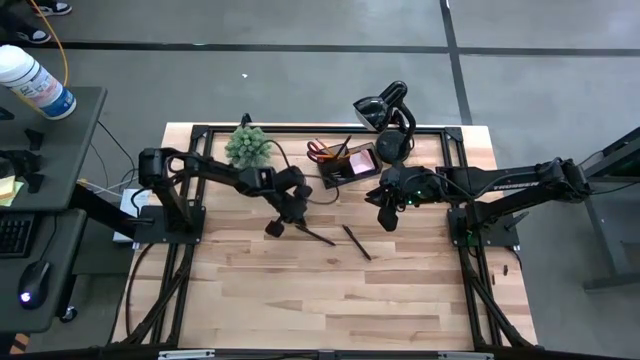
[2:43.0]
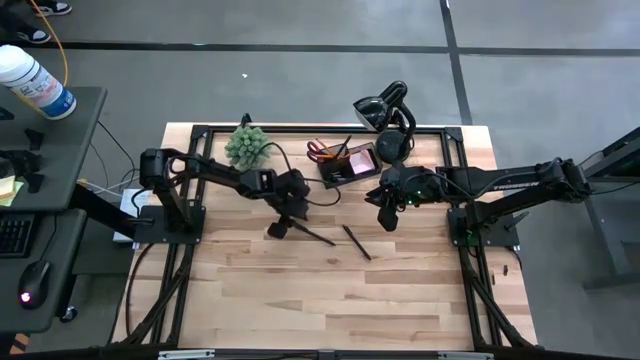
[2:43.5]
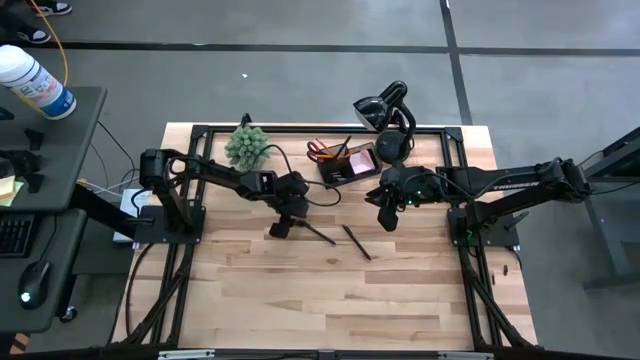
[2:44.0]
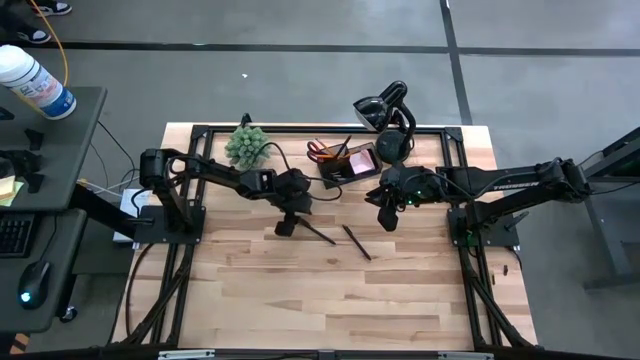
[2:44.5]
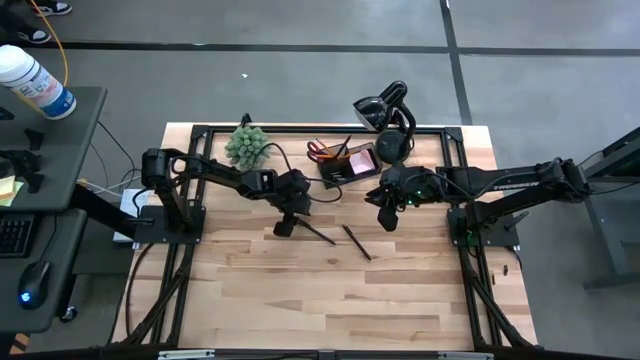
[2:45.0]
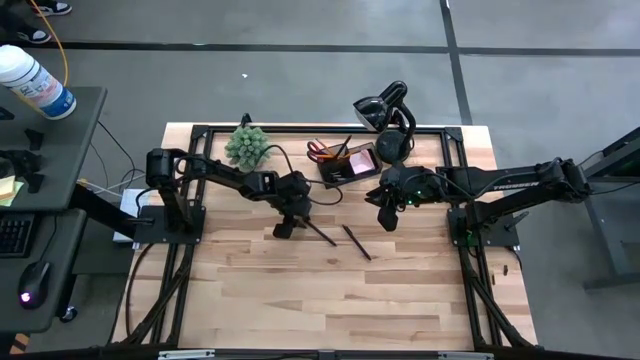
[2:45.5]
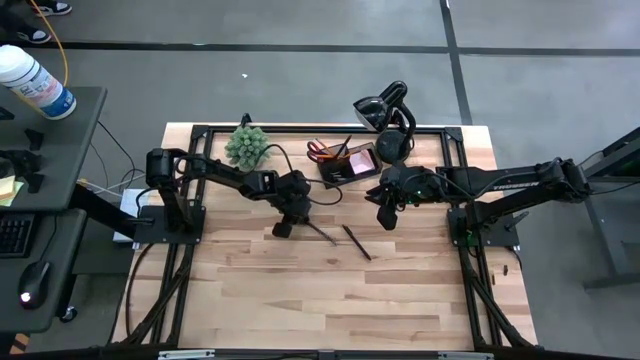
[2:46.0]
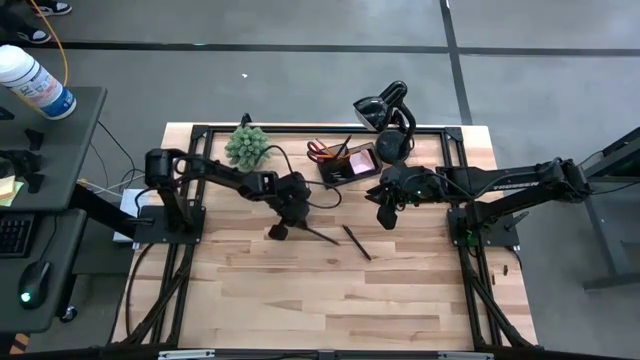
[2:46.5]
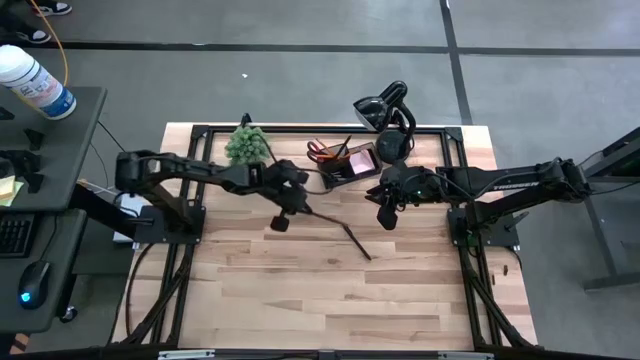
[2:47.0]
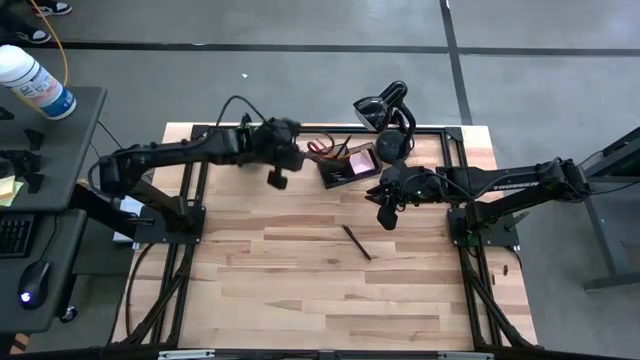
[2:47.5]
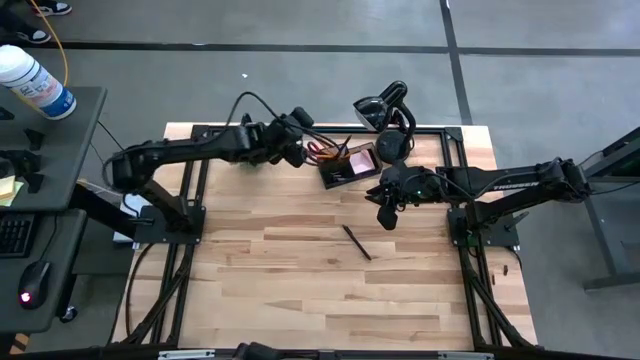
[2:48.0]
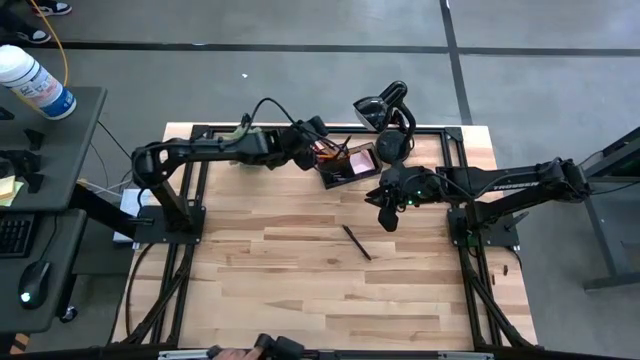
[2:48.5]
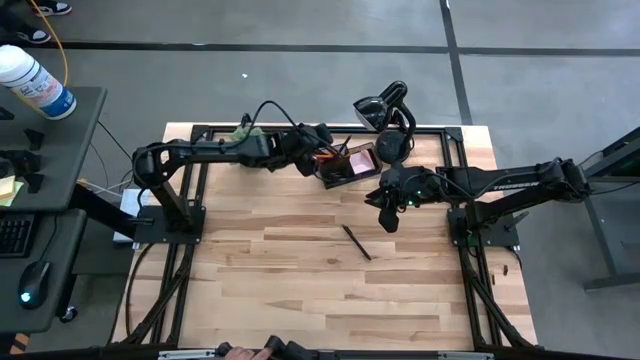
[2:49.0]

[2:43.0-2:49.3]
Task: Pick and place office supplies into organizer
Put the left black pen into the black desk organizer

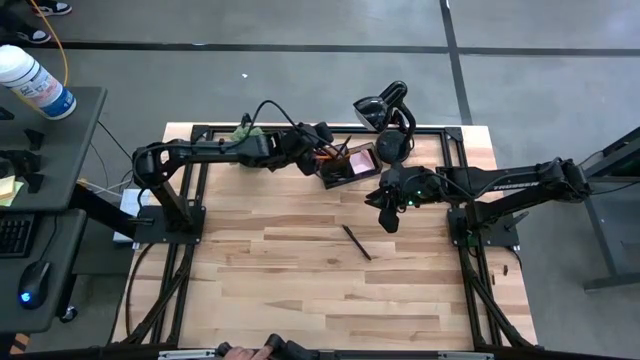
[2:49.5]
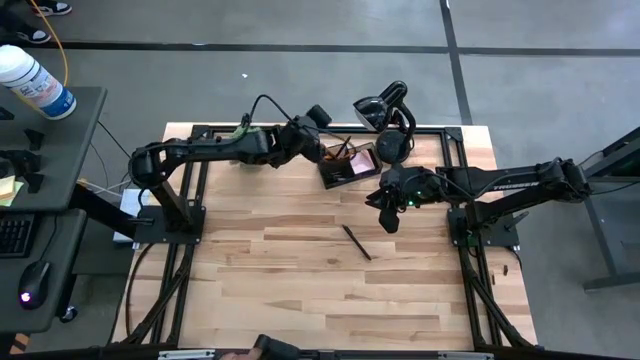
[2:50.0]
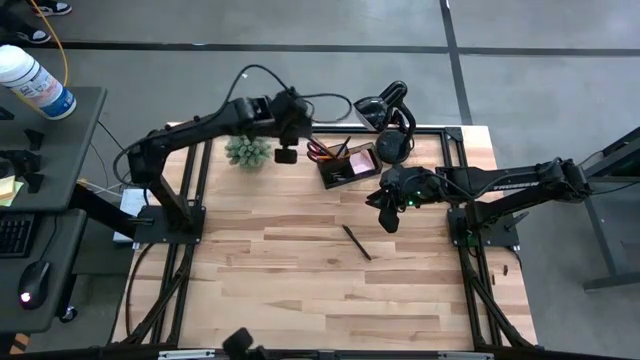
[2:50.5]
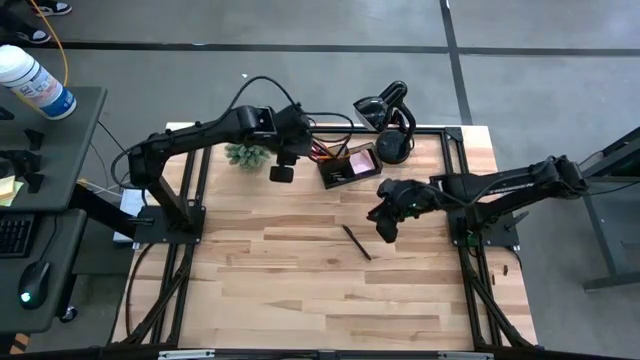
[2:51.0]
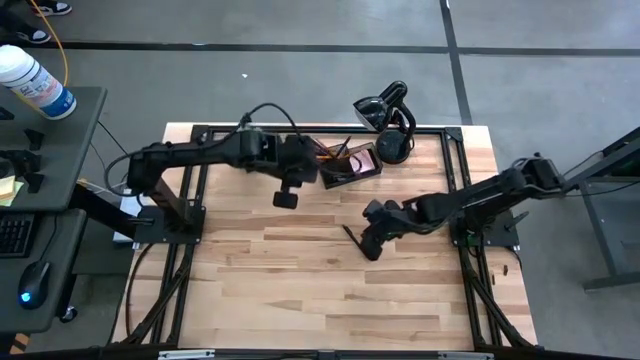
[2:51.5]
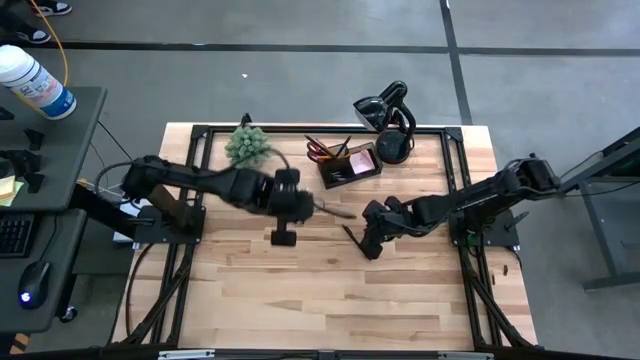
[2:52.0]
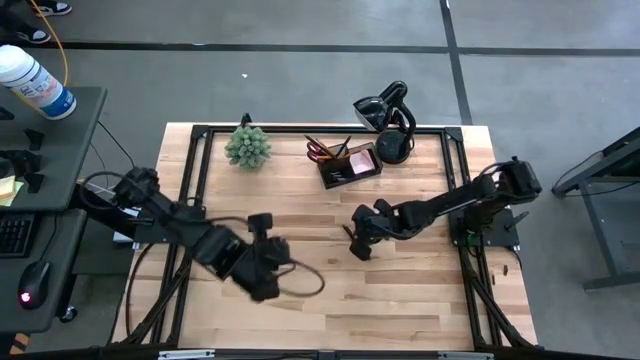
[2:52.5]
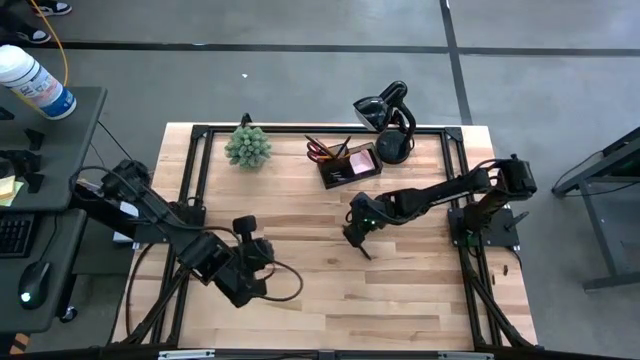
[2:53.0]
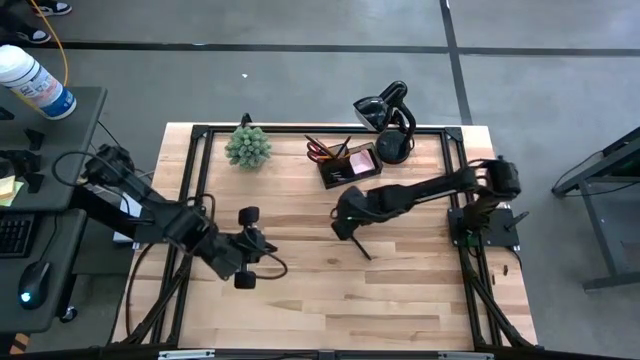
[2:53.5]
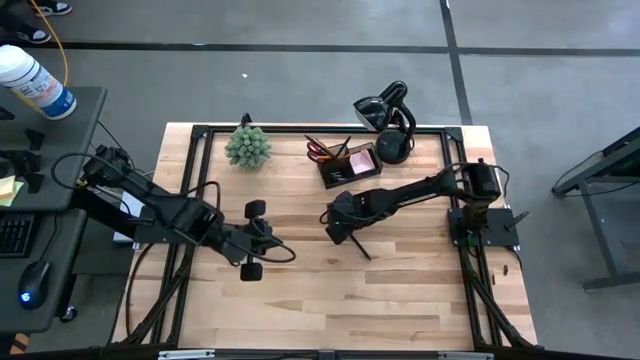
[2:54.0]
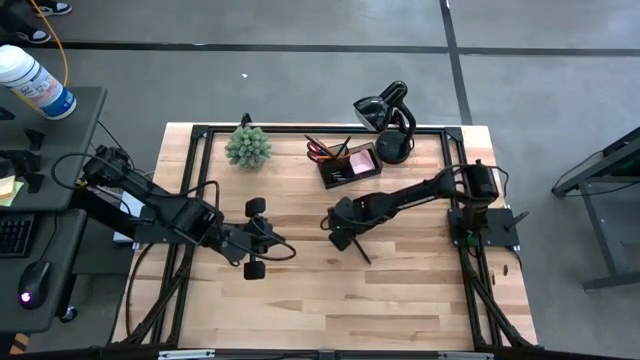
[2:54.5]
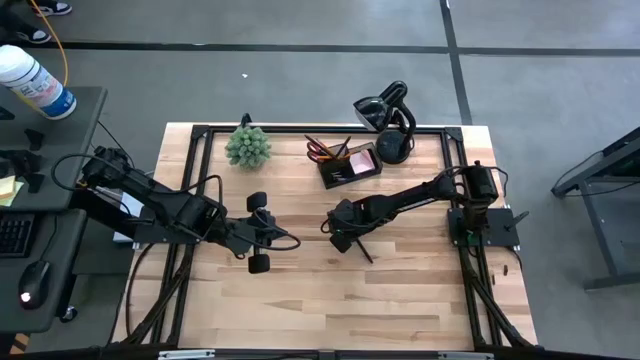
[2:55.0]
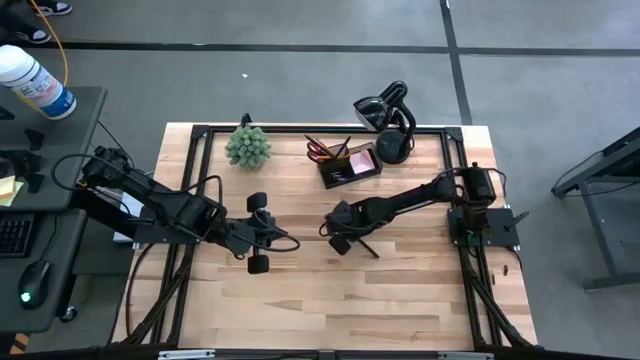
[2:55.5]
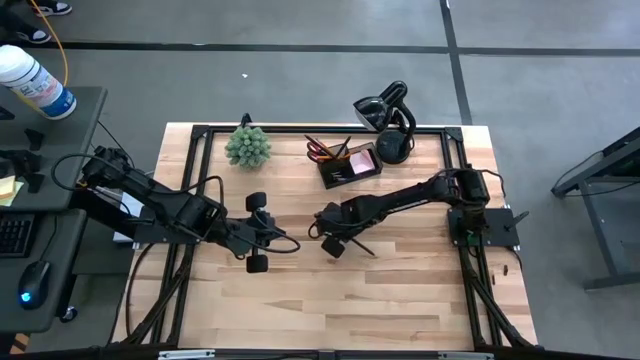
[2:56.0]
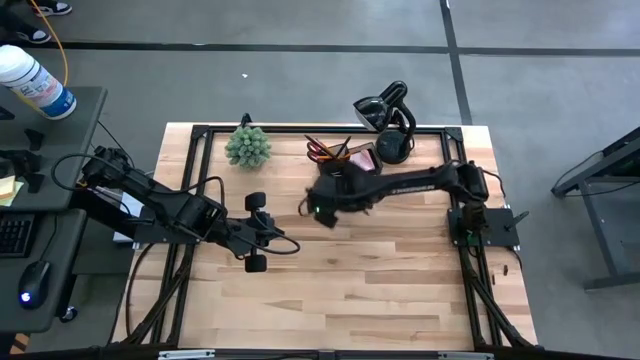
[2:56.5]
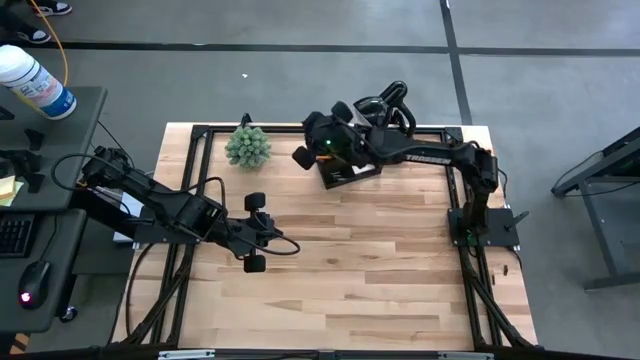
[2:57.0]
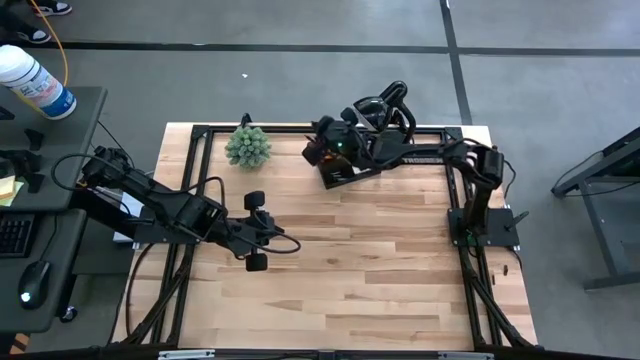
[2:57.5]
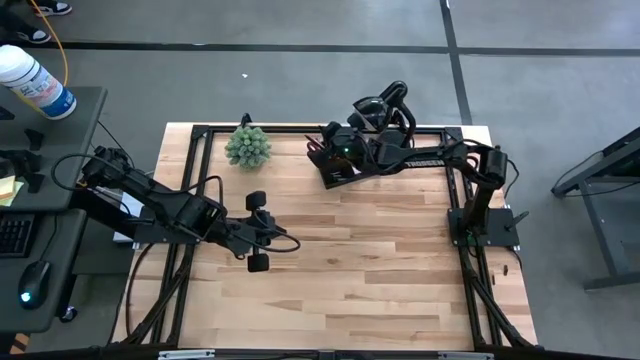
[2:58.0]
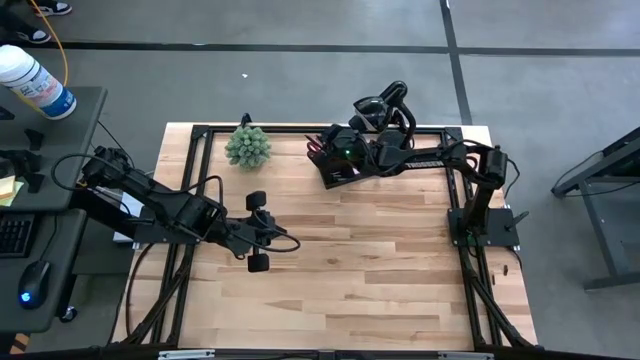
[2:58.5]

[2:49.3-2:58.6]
Put the black pen into the black desk organizer

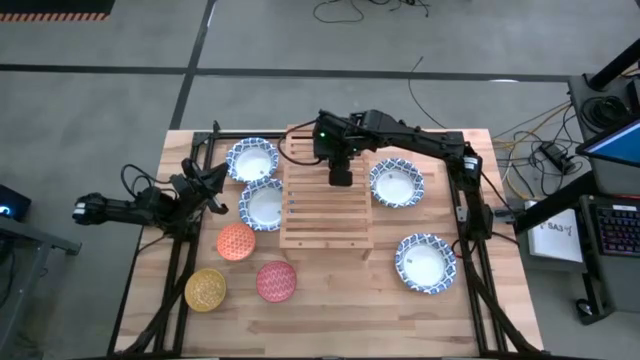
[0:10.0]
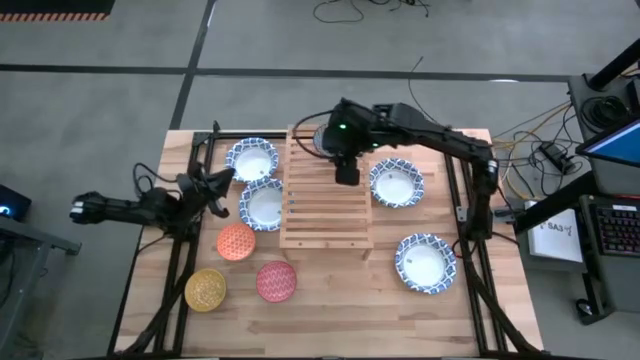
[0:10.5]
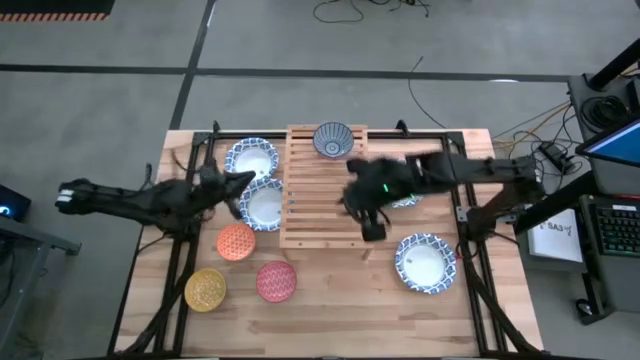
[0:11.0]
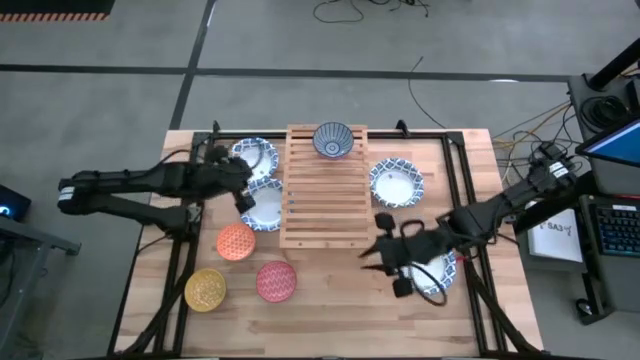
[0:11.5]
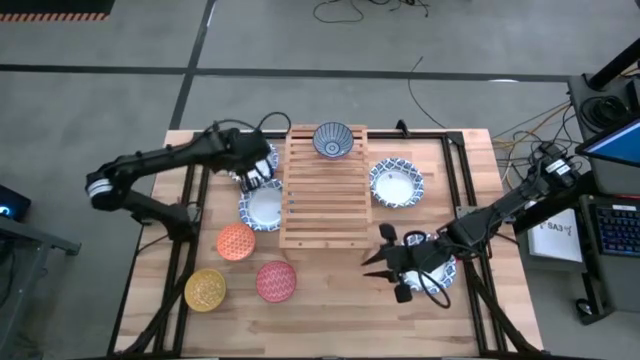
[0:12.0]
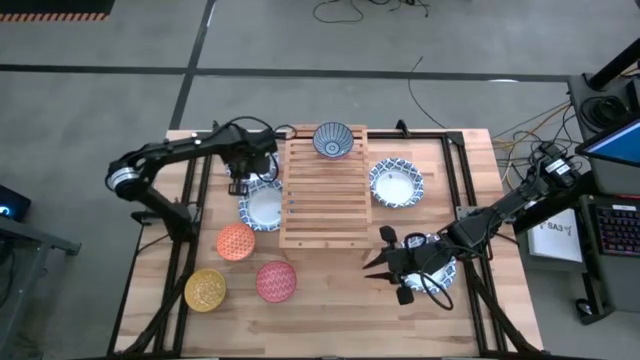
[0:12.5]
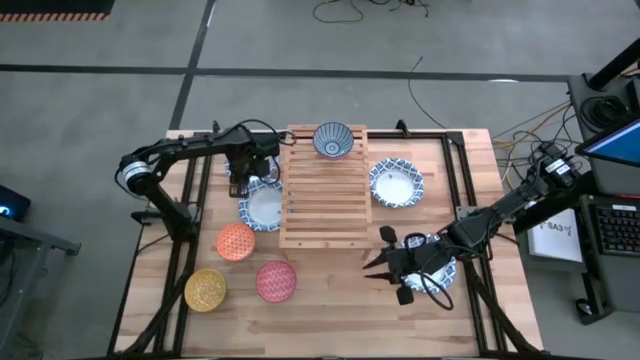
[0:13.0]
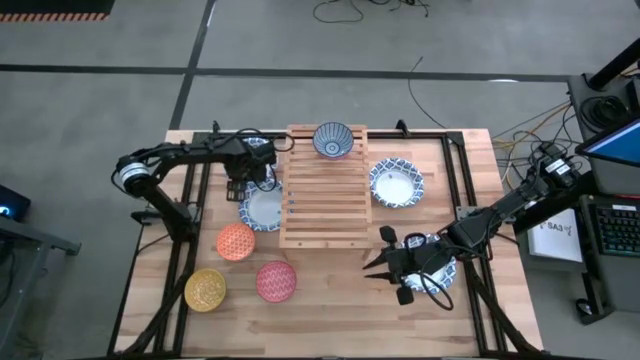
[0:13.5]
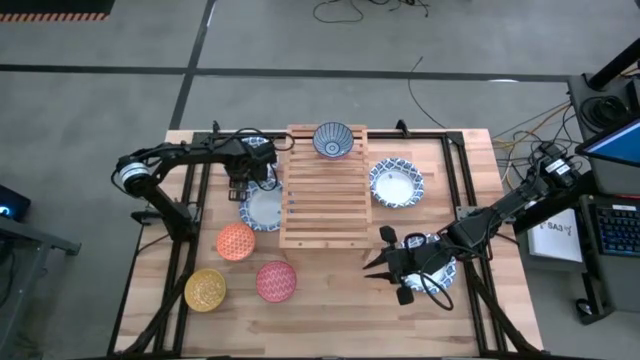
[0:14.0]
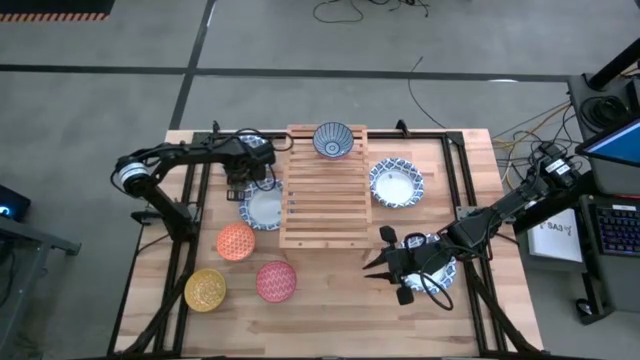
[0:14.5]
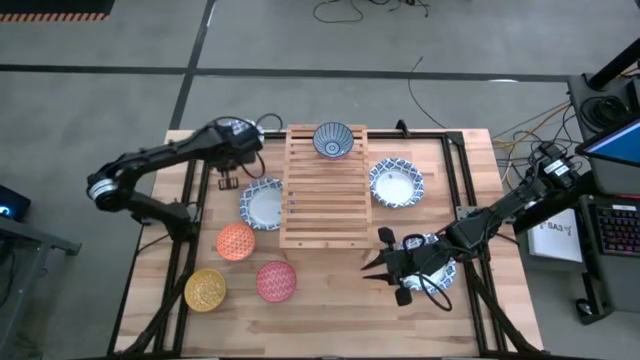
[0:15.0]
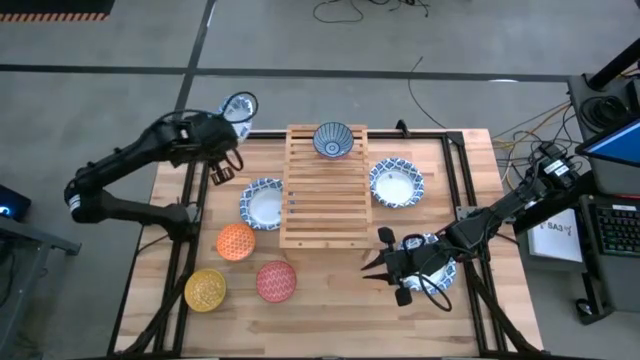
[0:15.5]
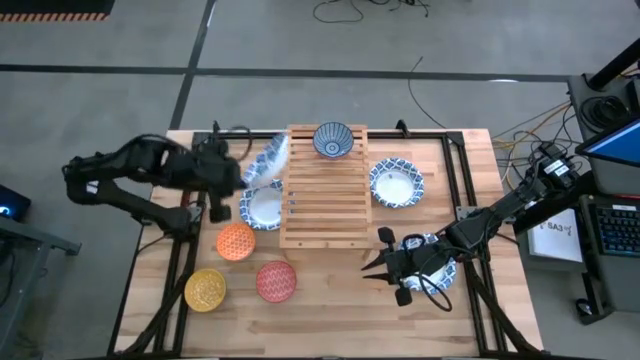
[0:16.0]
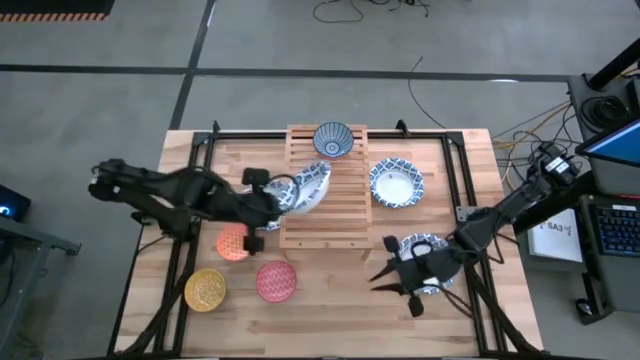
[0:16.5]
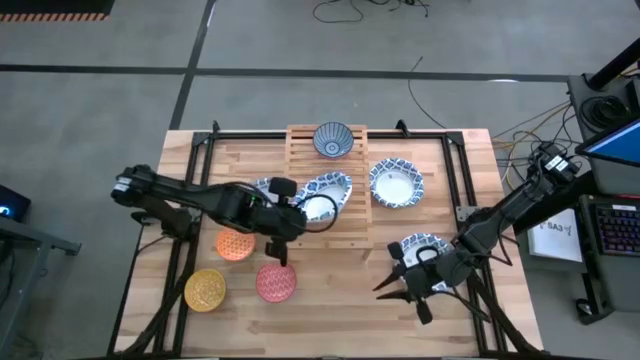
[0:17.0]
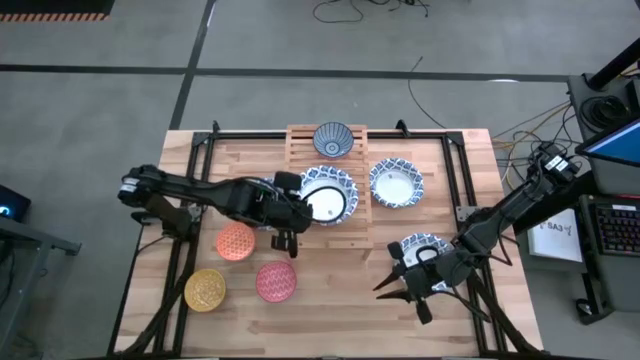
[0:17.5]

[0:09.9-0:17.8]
Task: Place and stack bowls onto a shelf
Put the top left white patterned bowl on the shelf
